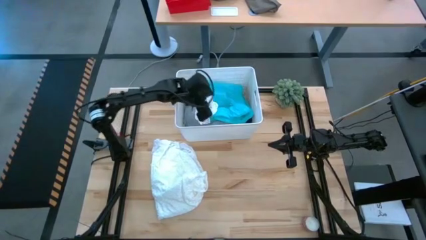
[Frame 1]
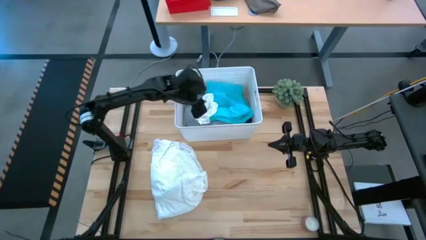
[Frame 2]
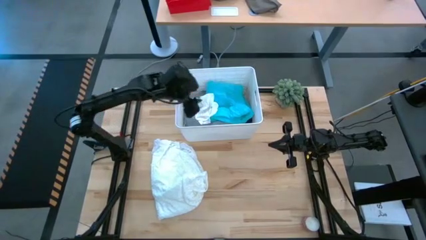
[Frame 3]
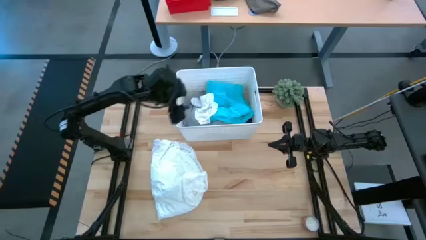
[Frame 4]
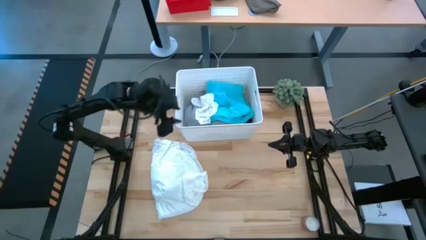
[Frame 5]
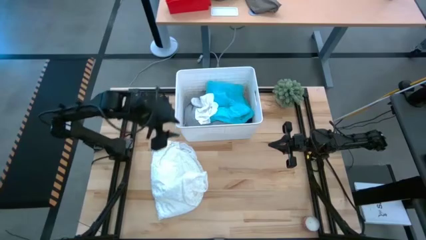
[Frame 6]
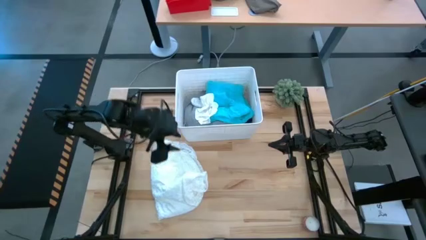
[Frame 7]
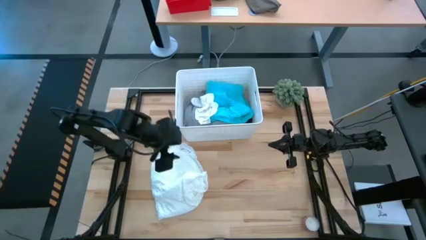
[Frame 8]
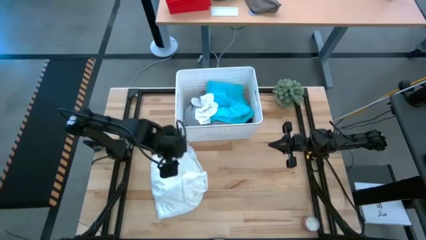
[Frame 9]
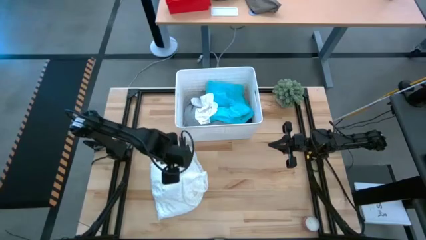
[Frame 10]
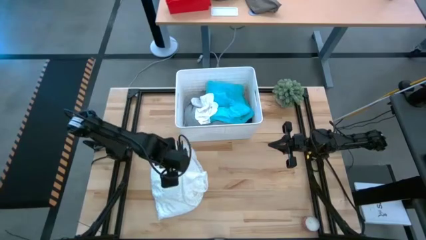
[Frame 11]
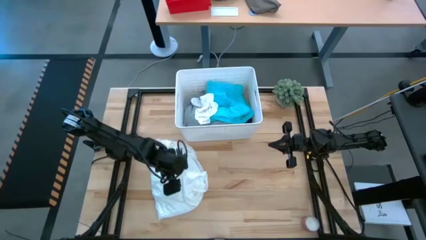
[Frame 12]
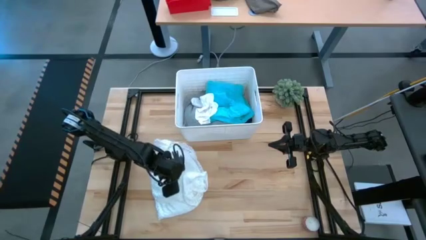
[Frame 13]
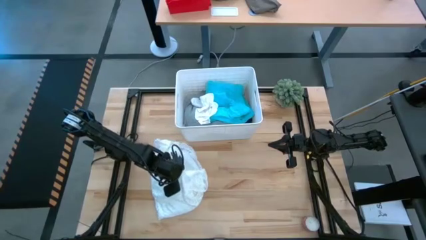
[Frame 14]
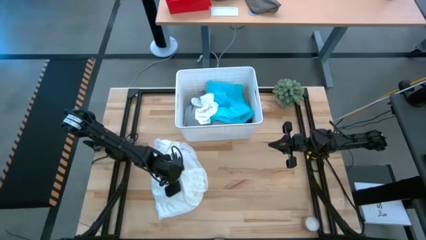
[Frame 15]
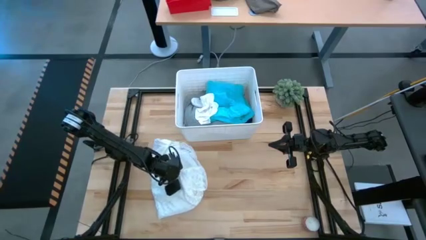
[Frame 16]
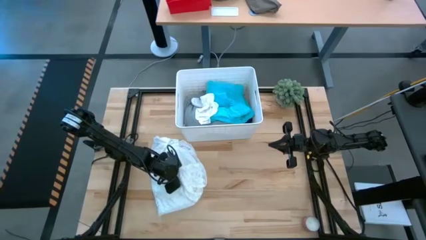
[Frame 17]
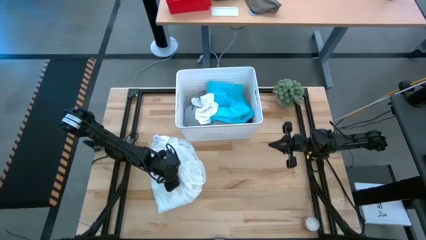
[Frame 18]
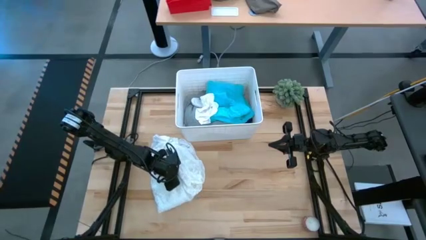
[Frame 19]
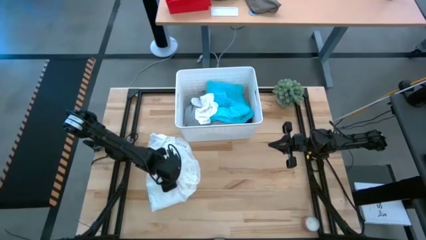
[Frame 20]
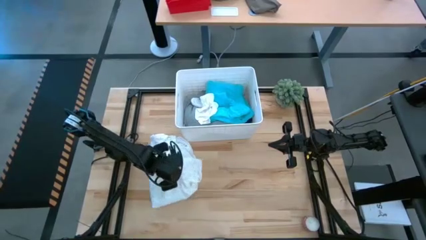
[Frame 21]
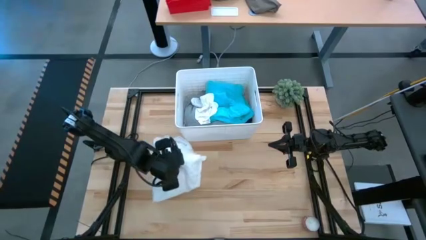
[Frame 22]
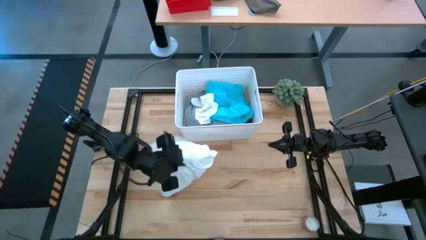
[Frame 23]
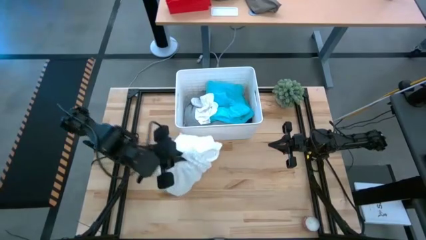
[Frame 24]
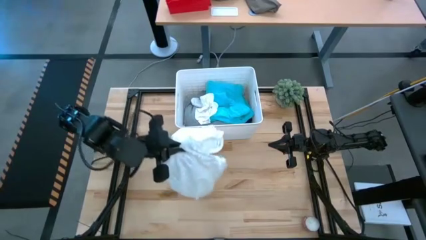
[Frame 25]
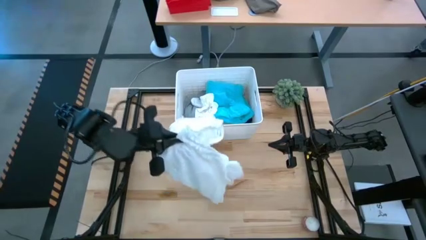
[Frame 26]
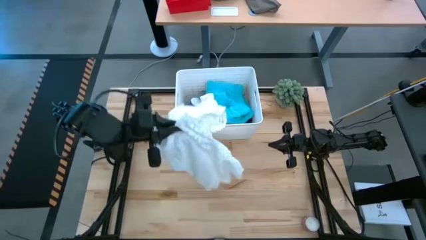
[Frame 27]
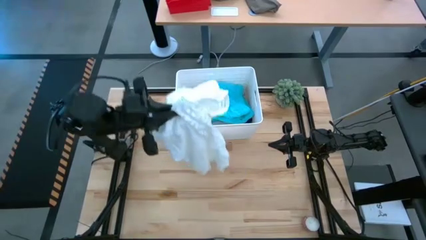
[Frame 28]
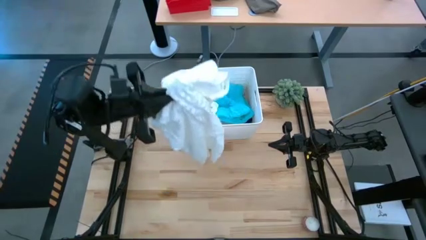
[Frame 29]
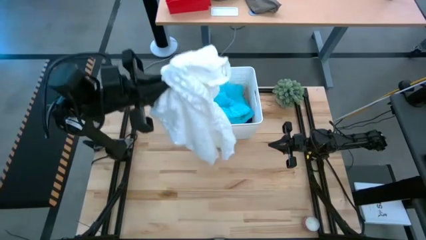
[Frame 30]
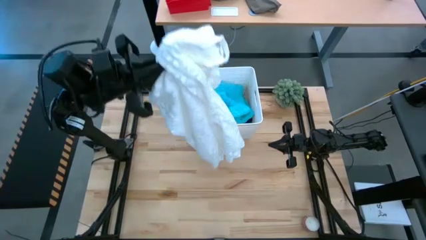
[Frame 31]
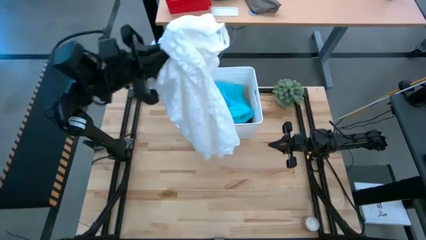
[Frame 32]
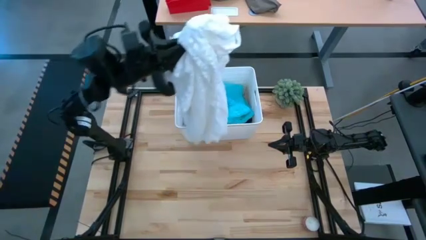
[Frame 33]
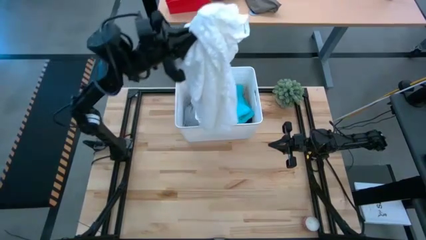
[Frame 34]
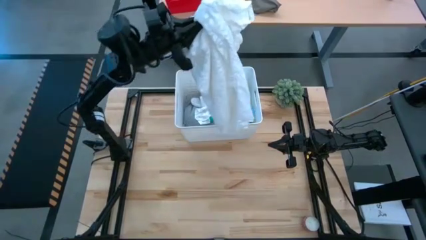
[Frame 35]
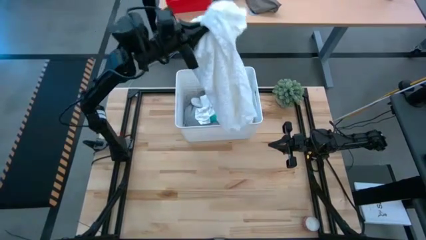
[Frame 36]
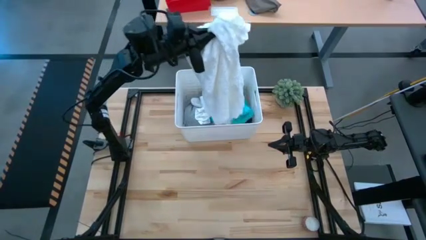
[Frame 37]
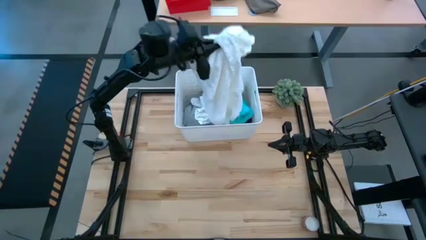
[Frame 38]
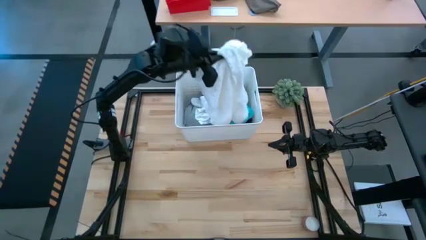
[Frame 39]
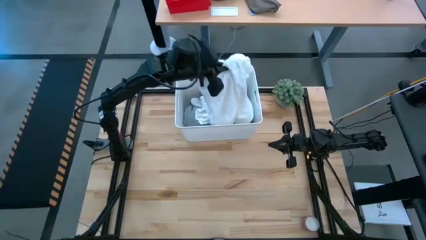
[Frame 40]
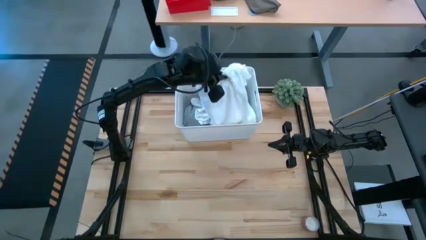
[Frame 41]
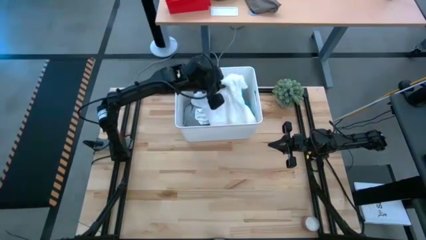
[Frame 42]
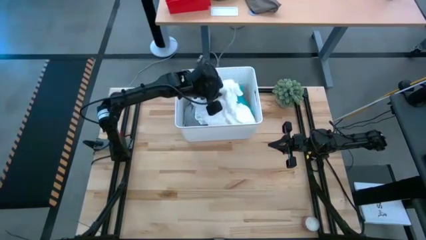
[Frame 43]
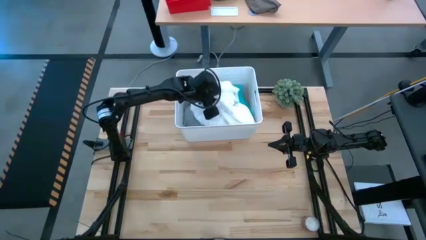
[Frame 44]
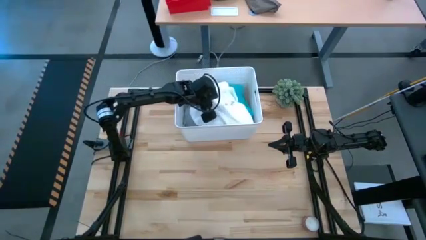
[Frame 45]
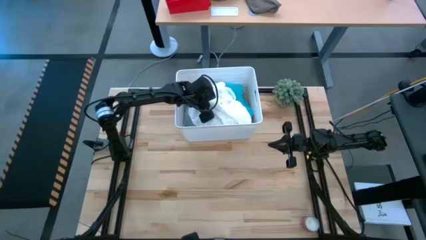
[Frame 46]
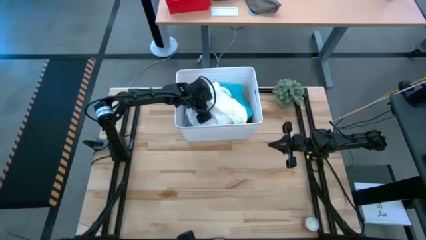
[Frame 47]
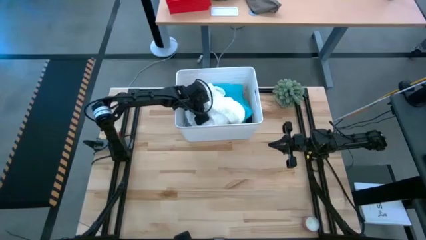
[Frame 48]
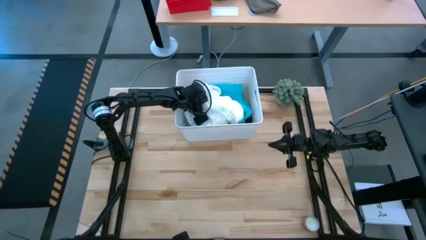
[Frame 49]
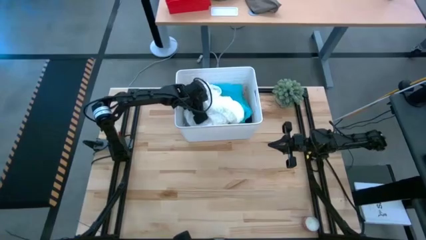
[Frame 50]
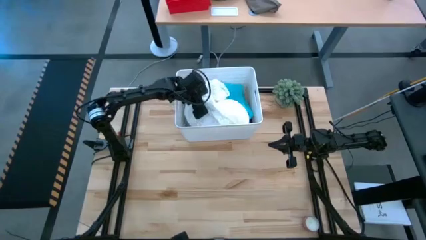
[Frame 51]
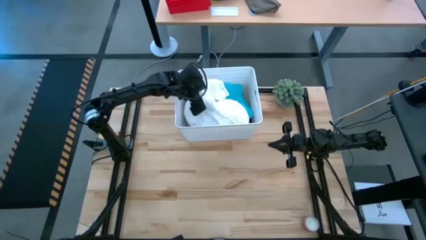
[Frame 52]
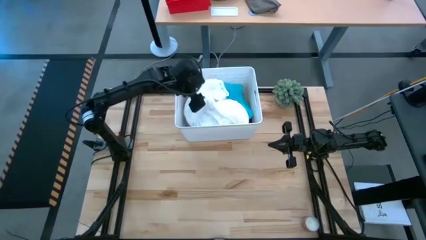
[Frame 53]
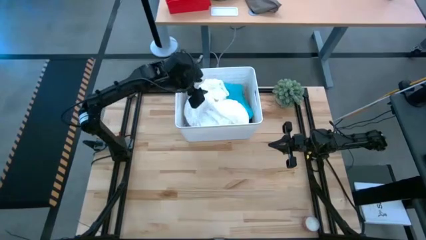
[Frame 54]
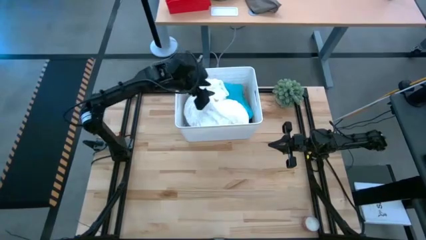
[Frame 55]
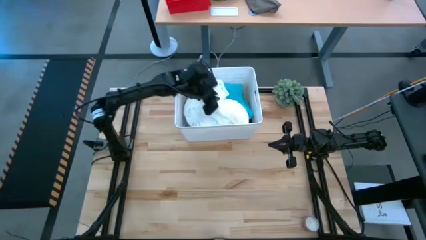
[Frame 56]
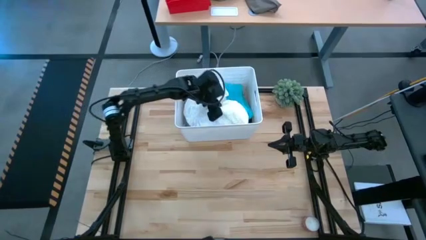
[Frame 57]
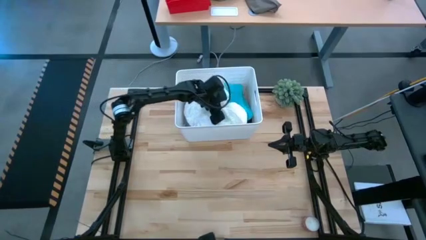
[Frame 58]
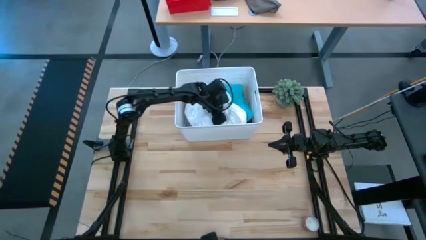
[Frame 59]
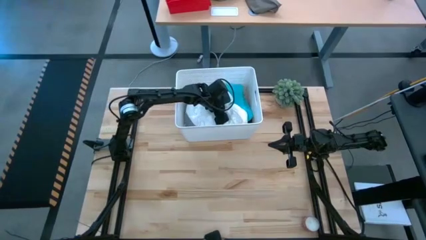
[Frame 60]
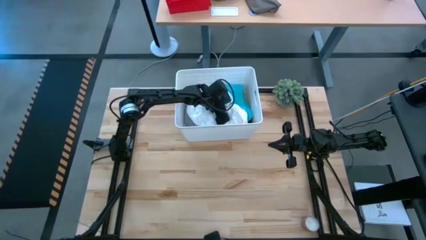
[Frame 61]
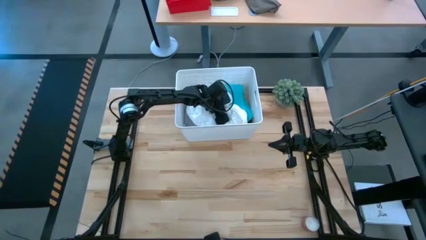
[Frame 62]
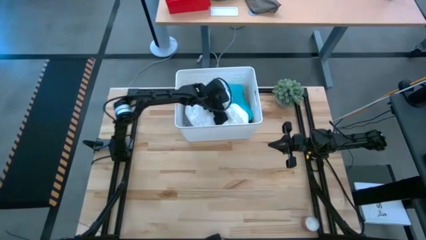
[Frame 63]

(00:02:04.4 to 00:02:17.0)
Task: Sort clothes
Put the white dress into the white laundry bin

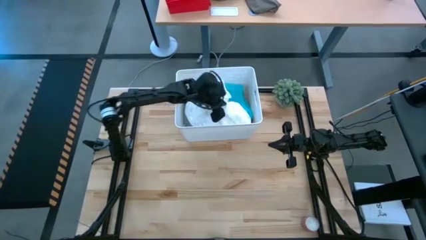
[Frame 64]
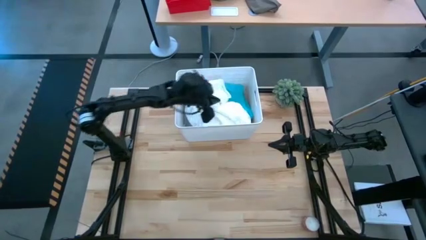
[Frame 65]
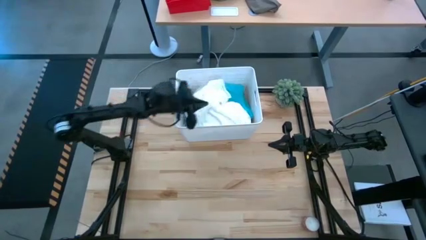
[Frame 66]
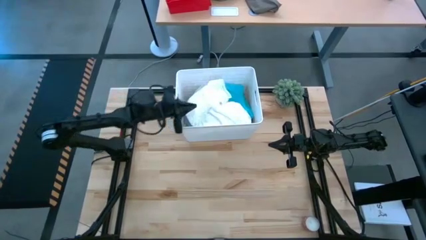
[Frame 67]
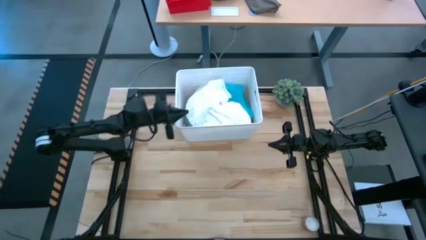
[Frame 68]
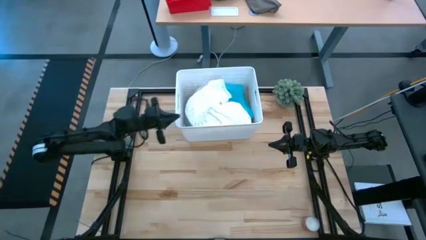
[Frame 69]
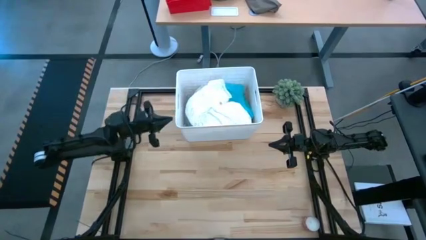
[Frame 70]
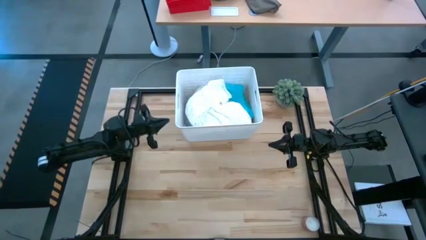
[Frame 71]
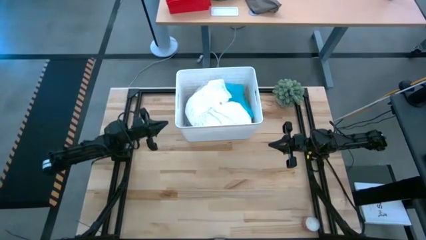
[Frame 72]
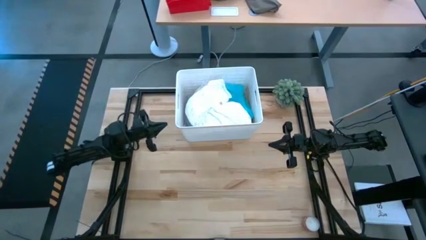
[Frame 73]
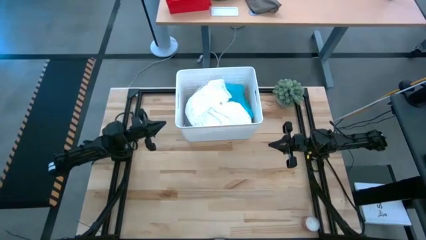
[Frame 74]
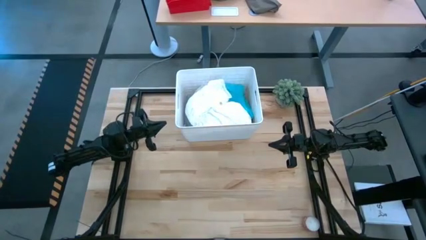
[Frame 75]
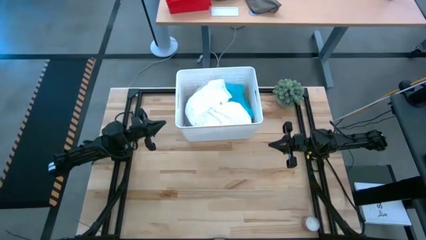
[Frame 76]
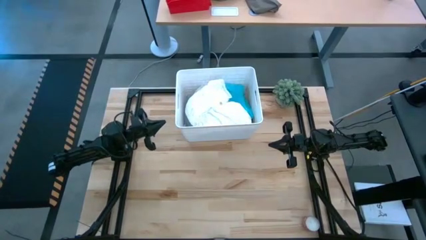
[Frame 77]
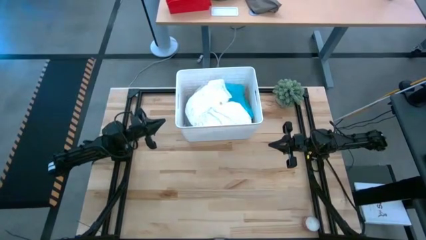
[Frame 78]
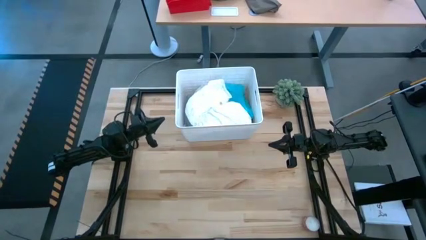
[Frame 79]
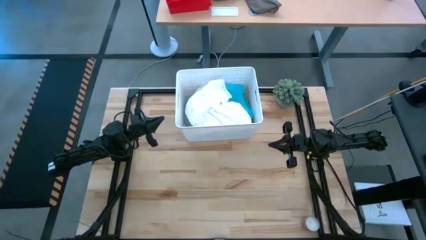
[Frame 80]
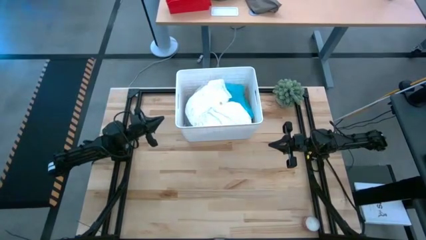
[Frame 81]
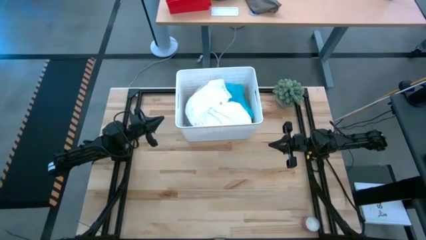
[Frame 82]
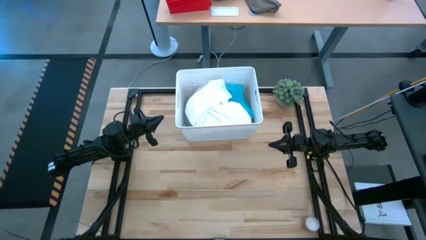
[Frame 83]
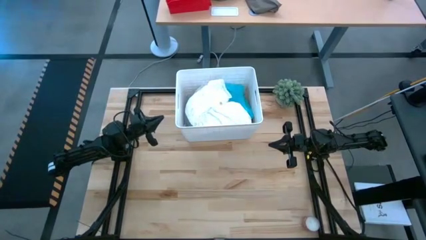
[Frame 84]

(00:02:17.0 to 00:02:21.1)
Return to Home Position

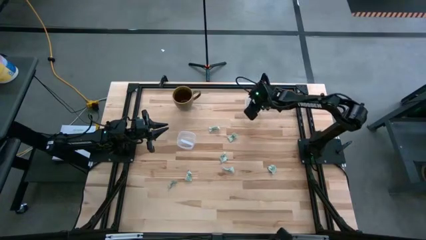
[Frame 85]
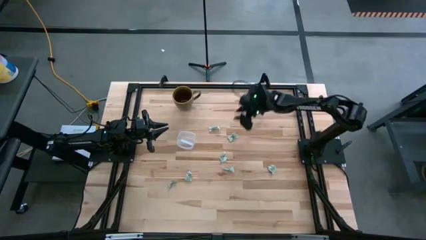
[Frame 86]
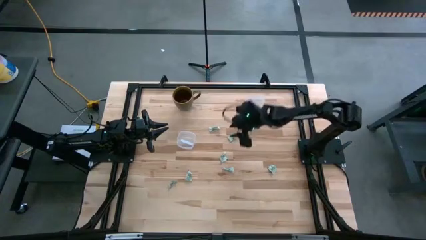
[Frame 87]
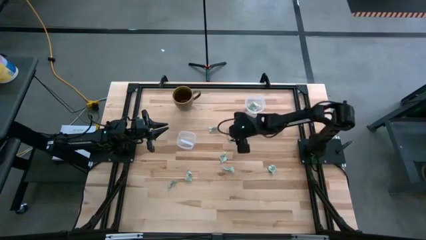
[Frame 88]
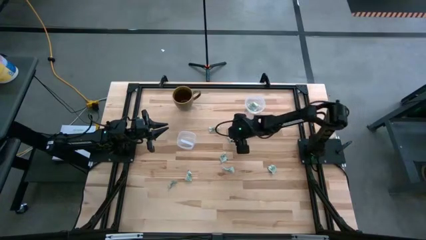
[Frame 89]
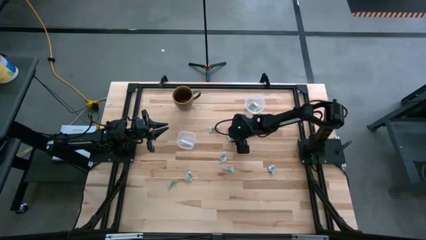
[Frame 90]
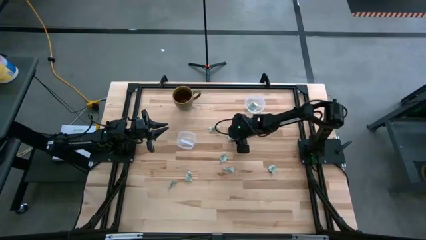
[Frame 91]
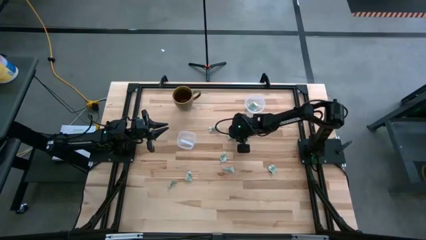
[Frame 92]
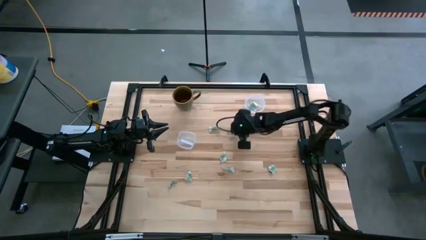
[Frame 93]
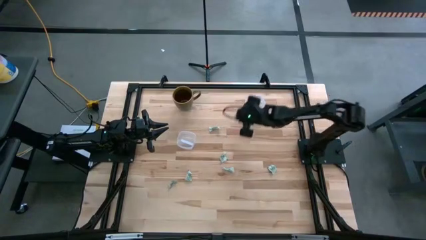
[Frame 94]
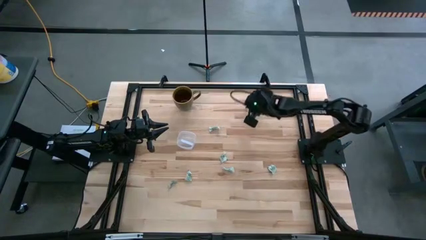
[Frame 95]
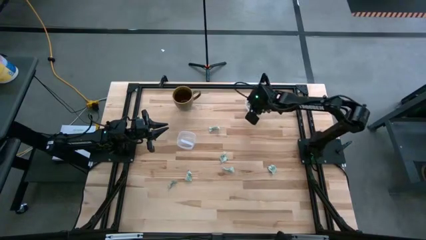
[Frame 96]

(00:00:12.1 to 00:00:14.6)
Task: Pick and place Stevia / Truvia into bins
Put the stevia packet into the top container
